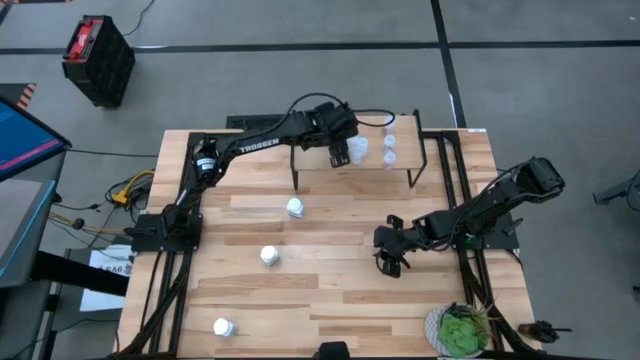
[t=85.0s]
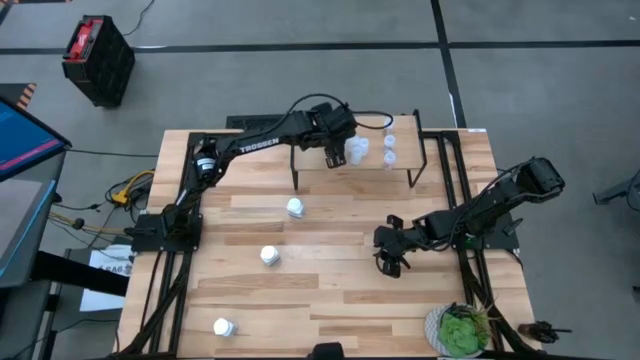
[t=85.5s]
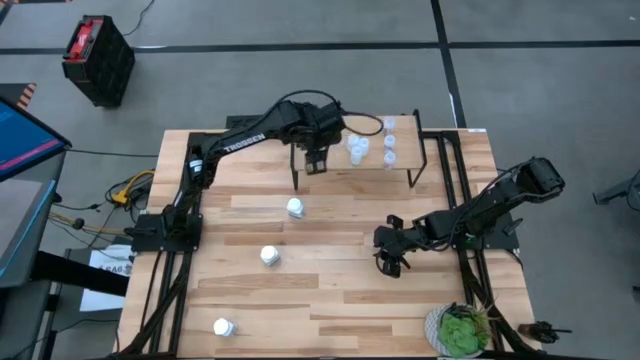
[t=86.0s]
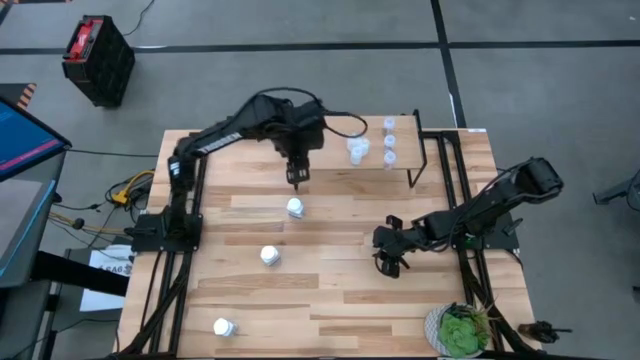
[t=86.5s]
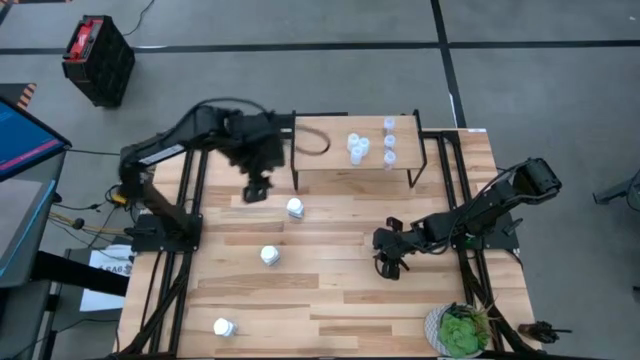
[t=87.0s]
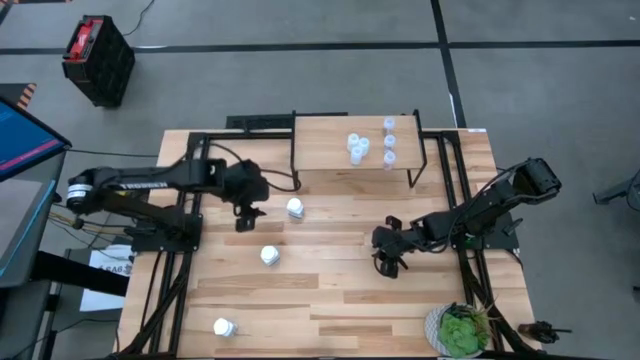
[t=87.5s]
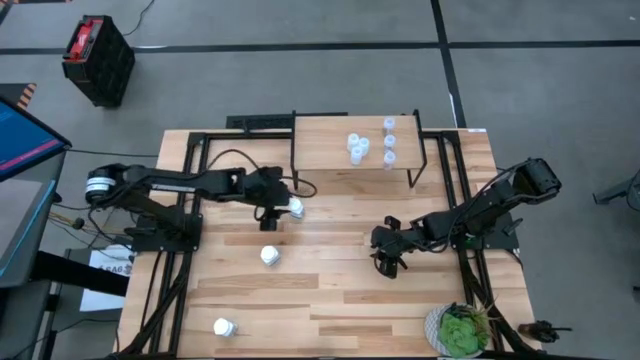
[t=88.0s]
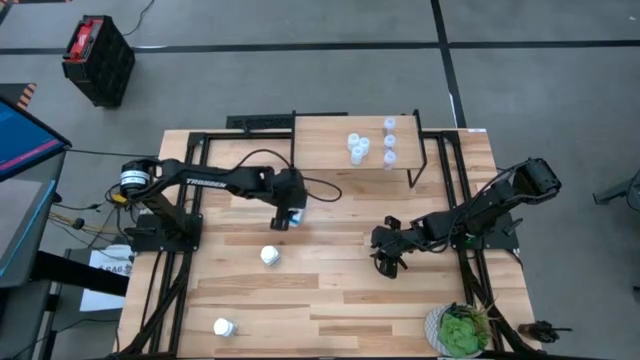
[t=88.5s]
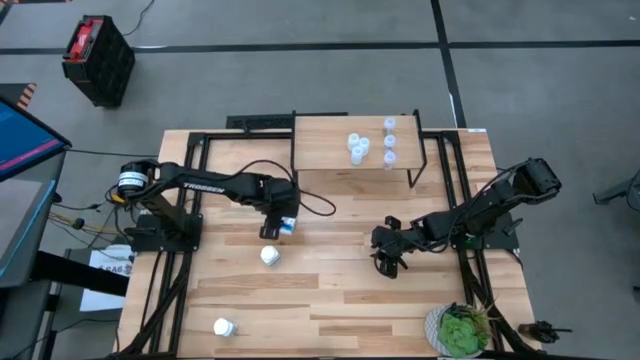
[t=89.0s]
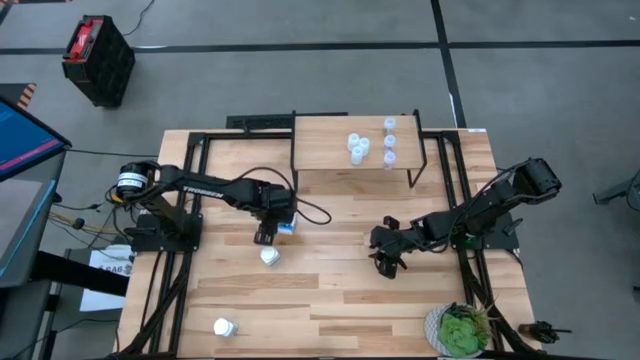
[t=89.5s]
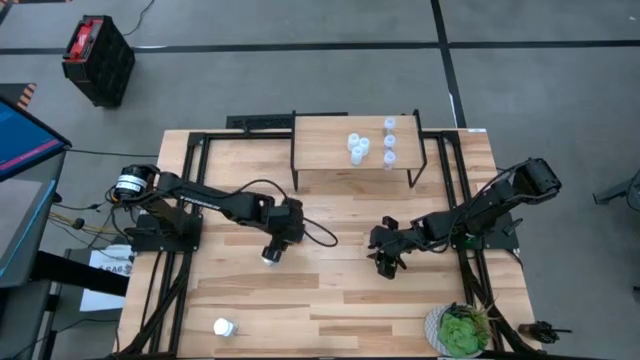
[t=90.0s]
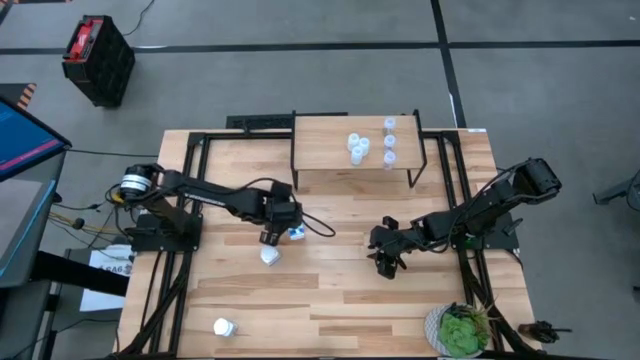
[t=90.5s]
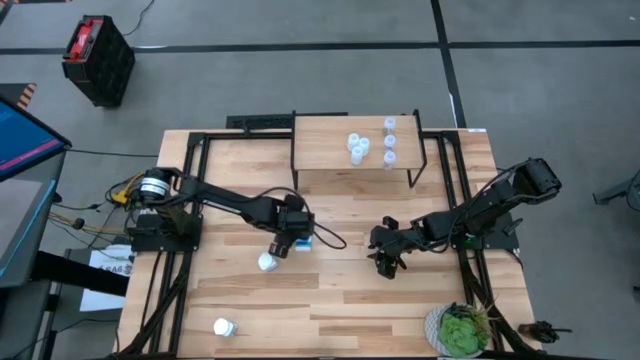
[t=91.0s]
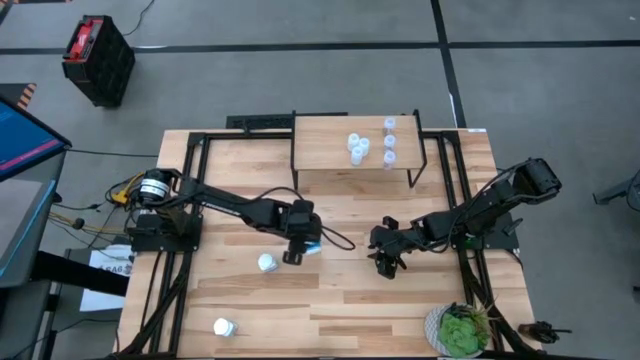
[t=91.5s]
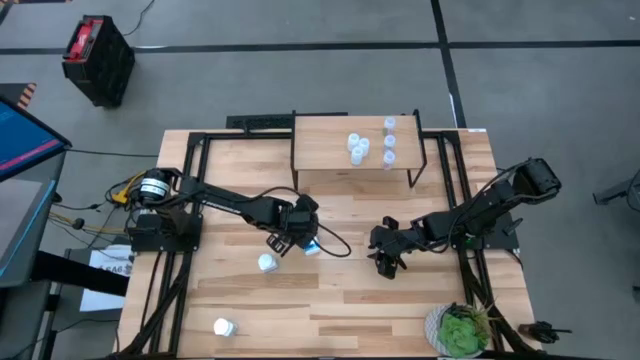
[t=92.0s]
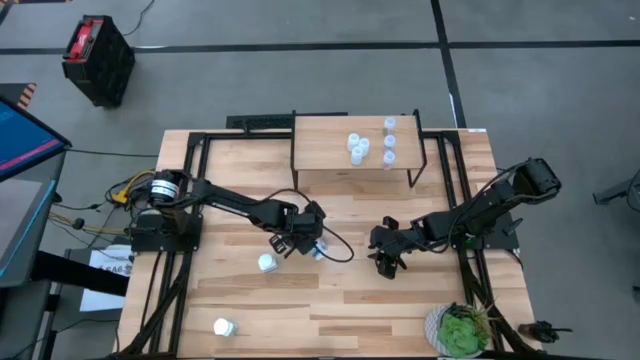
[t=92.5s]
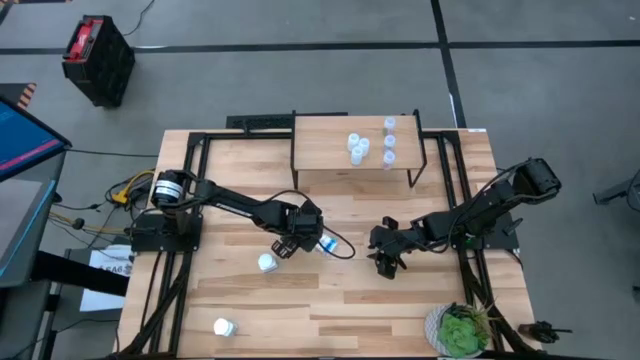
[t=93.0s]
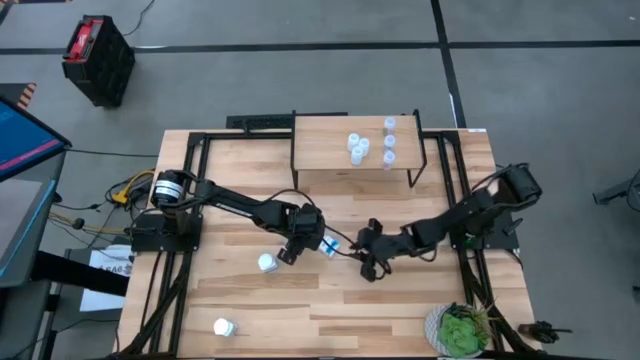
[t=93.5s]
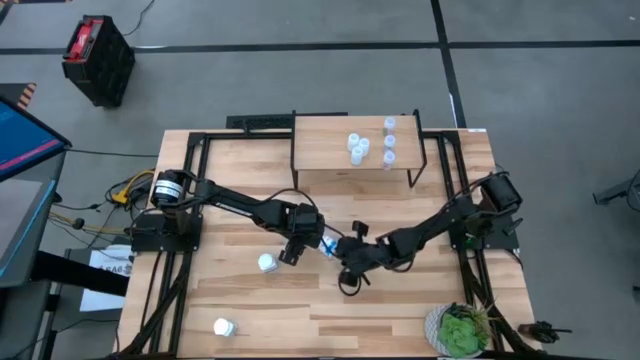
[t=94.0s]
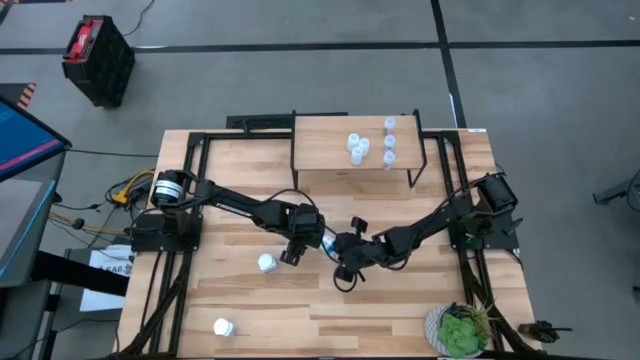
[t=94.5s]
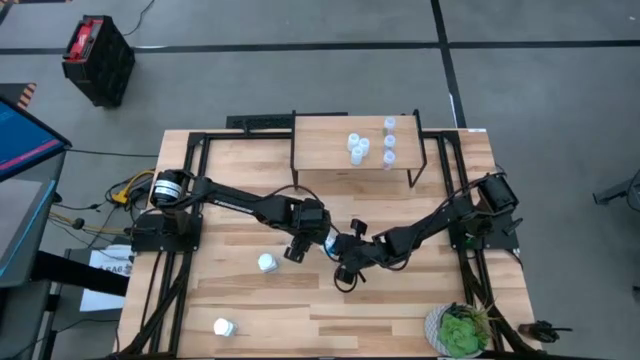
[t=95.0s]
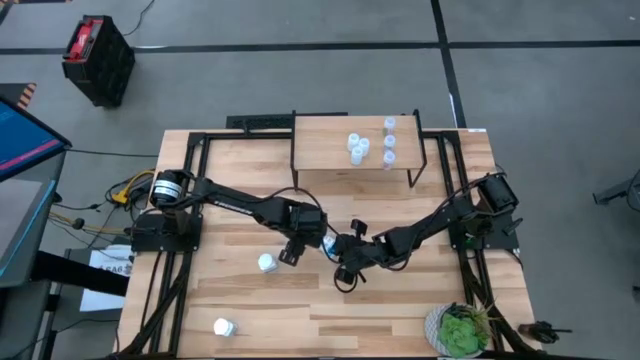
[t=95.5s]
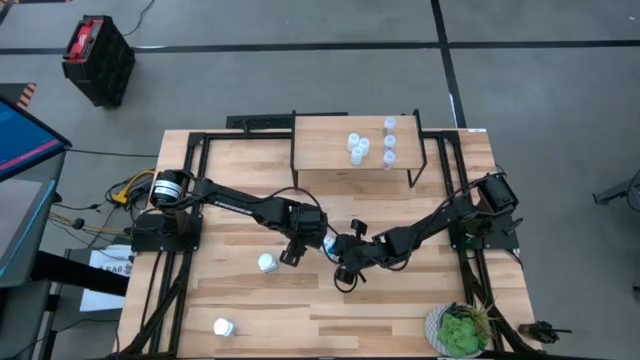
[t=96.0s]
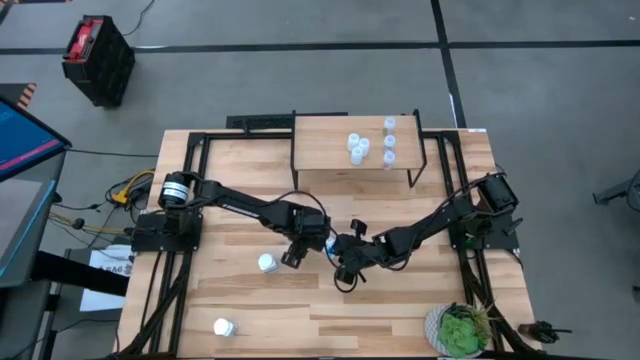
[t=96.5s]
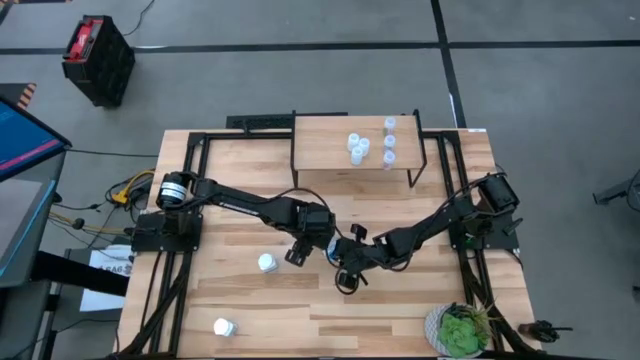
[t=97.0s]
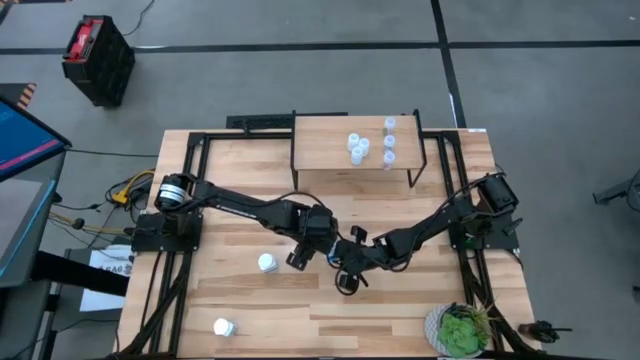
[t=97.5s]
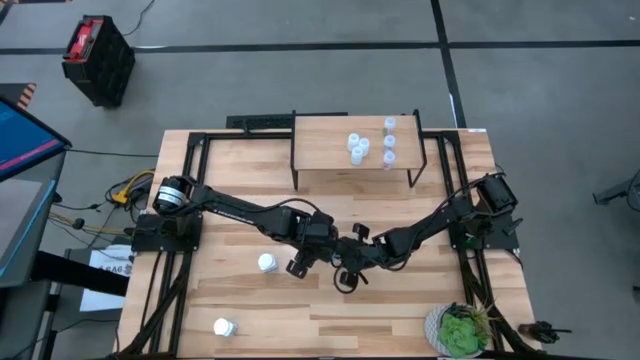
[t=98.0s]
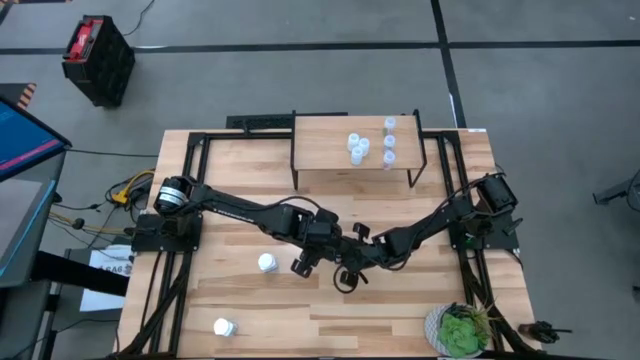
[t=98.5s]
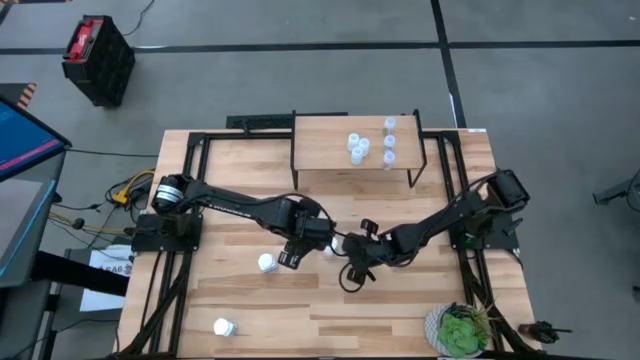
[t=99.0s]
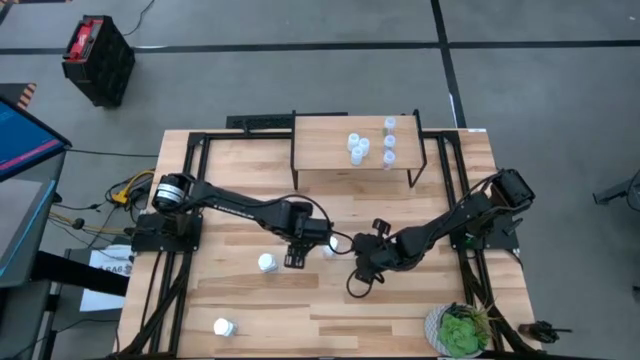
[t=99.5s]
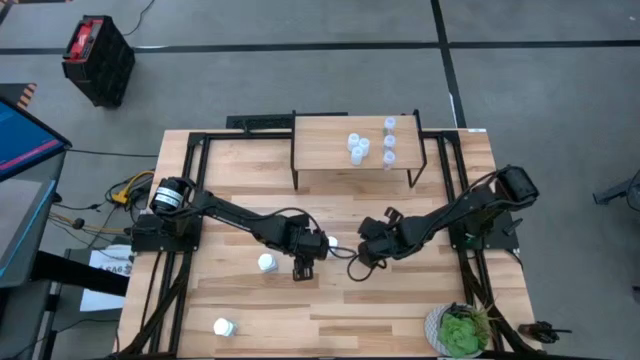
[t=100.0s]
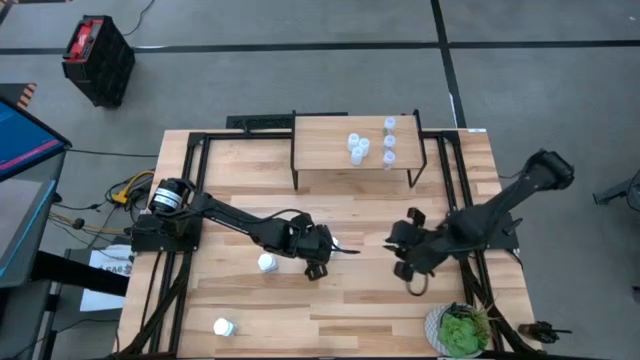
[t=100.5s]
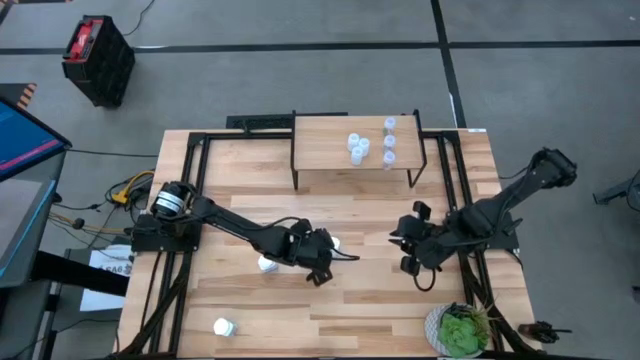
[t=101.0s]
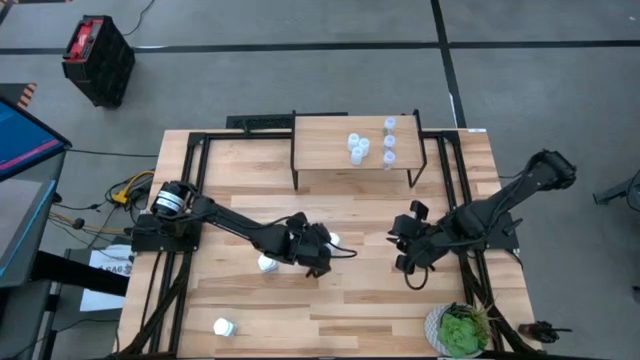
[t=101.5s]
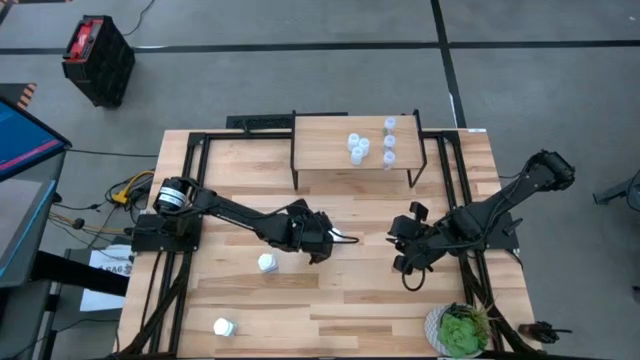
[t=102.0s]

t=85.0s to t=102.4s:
Task: Pick and place medicine bottles onto shelf by color
Put the top opaque medicine bottle onto the left side of the shelf

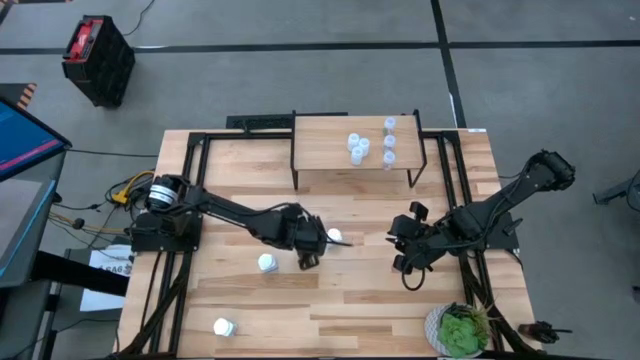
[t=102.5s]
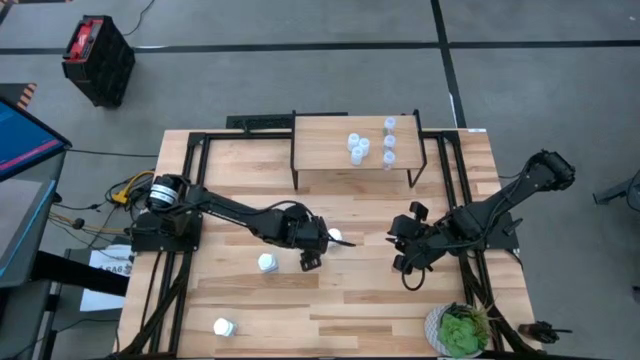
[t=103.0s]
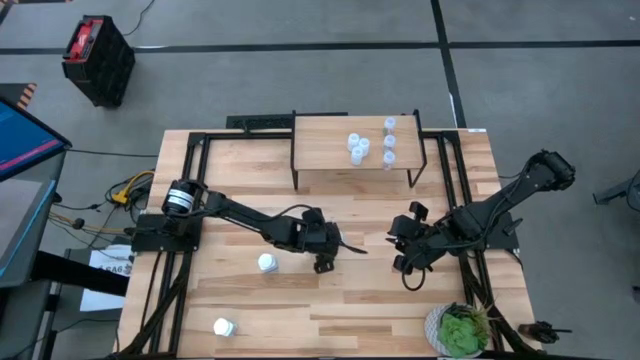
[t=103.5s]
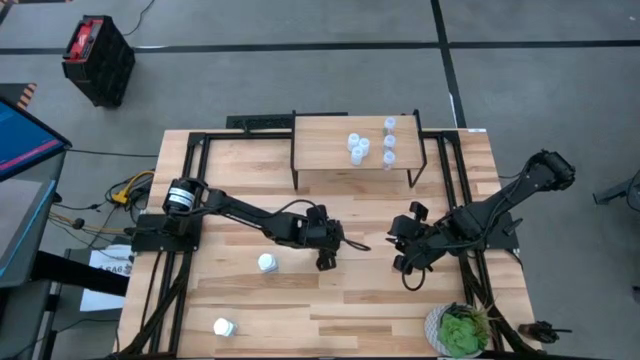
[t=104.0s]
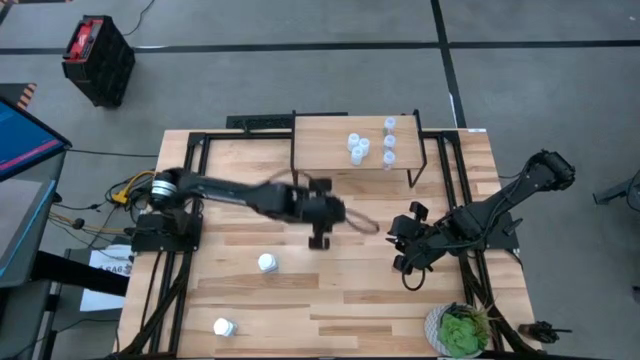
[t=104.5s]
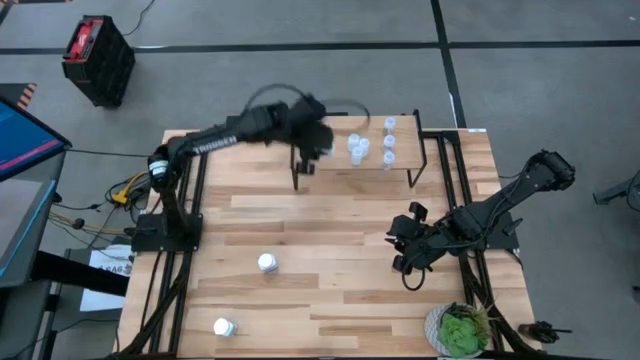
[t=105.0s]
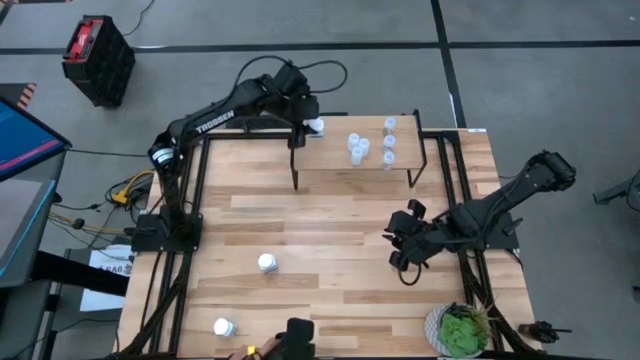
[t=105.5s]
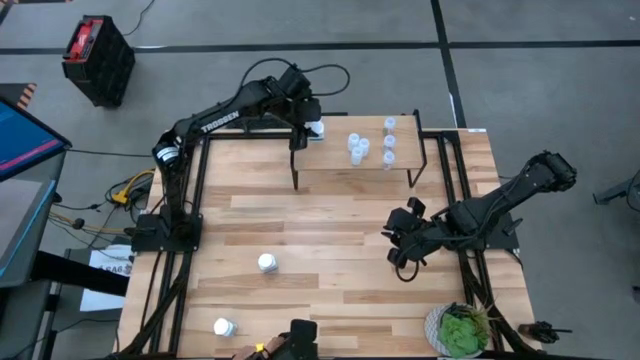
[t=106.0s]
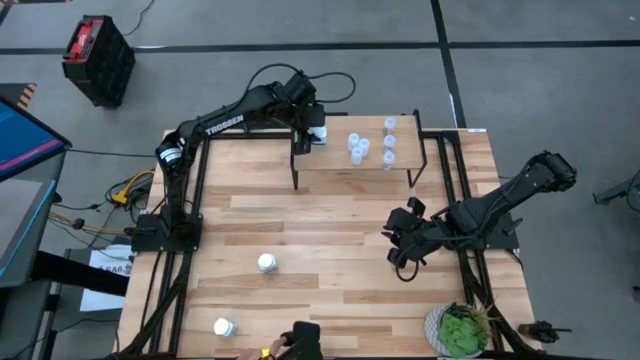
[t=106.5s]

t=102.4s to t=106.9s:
Put the top opaque medicine bottle onto the left side of the shelf
